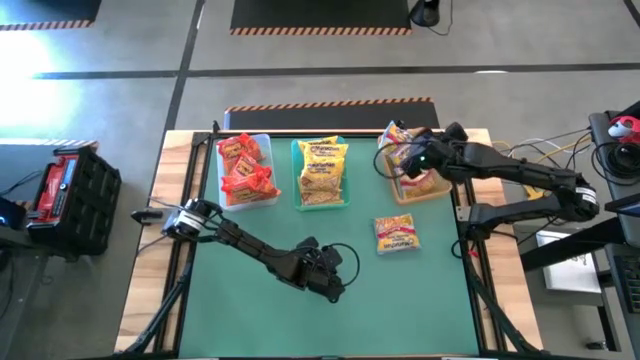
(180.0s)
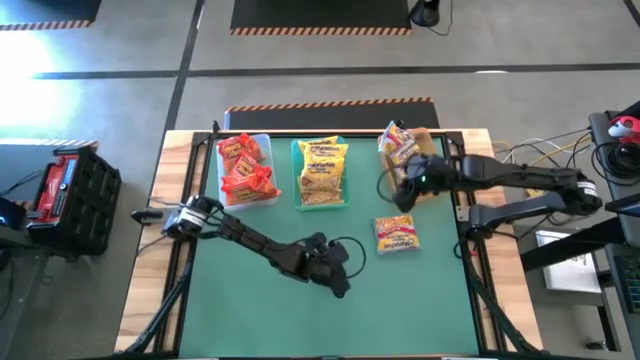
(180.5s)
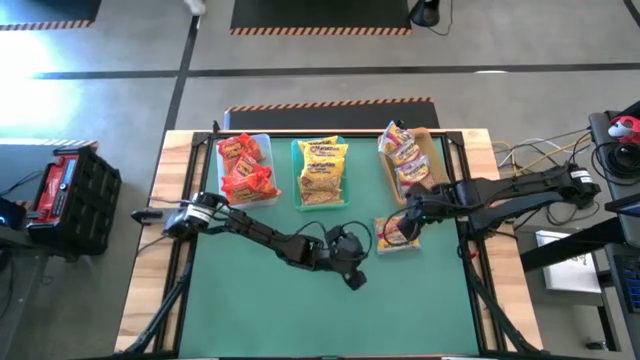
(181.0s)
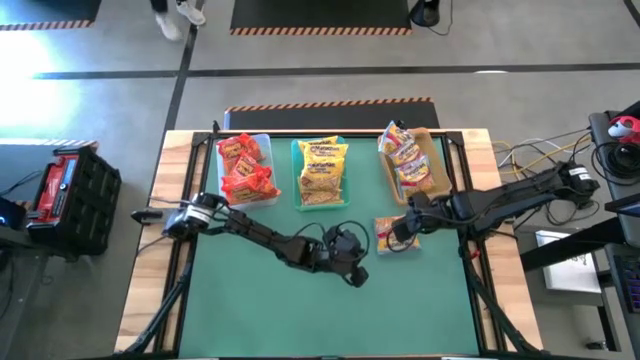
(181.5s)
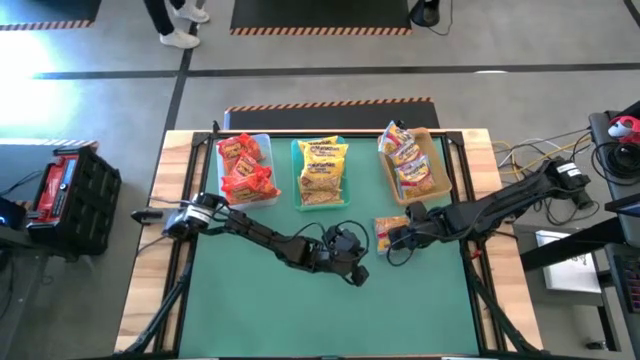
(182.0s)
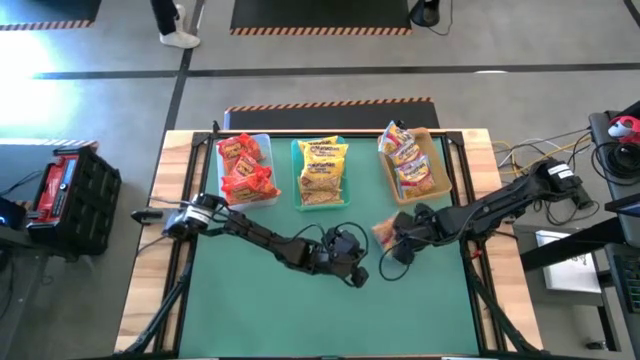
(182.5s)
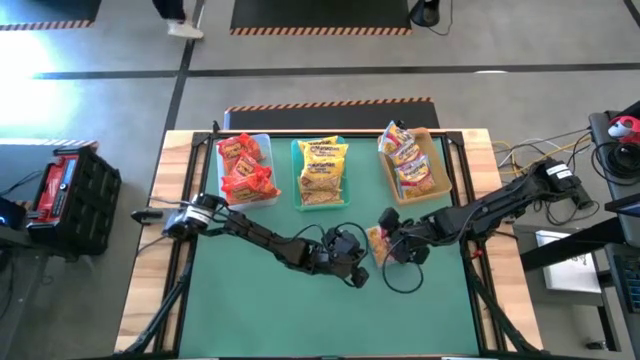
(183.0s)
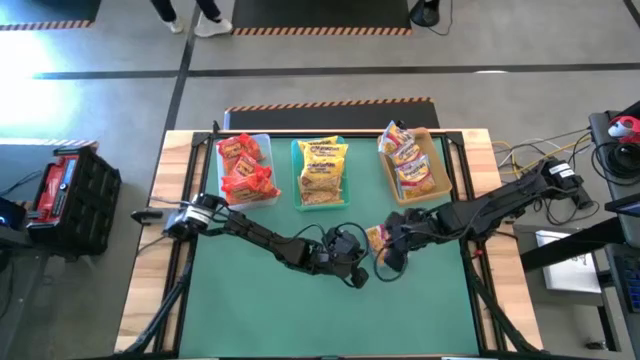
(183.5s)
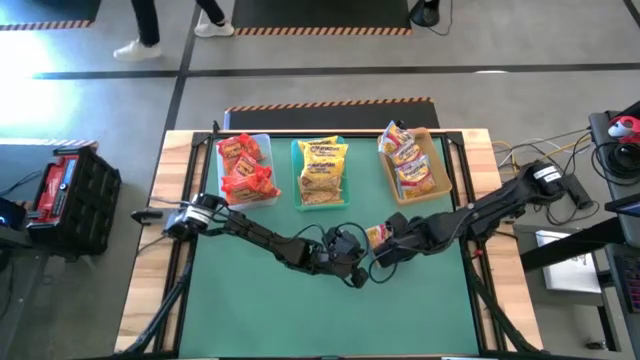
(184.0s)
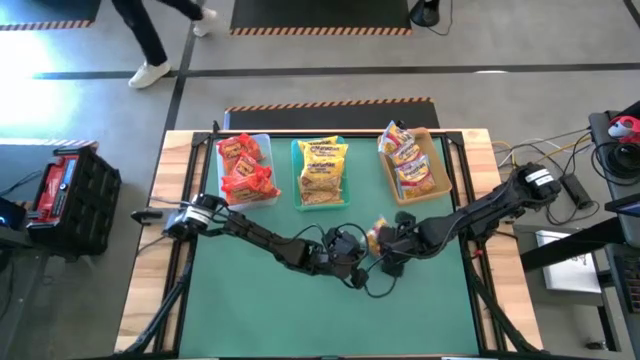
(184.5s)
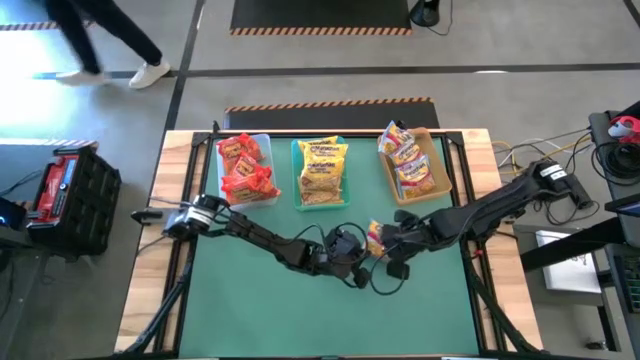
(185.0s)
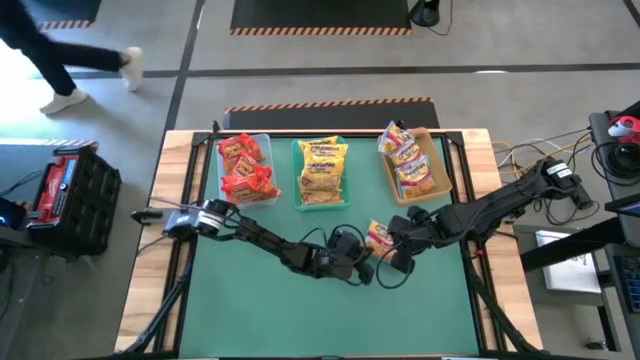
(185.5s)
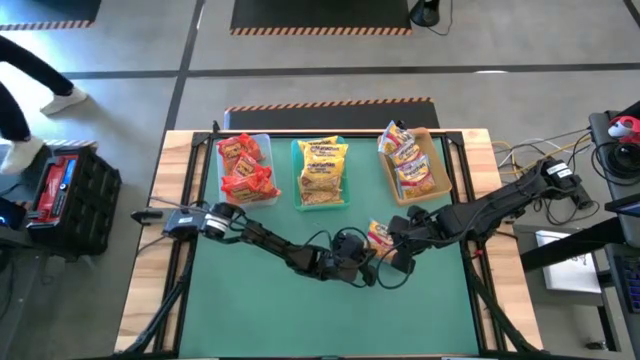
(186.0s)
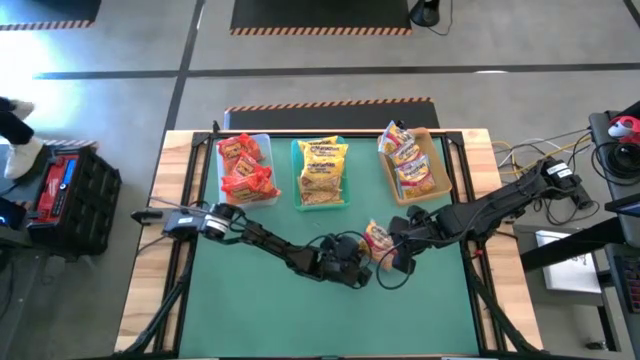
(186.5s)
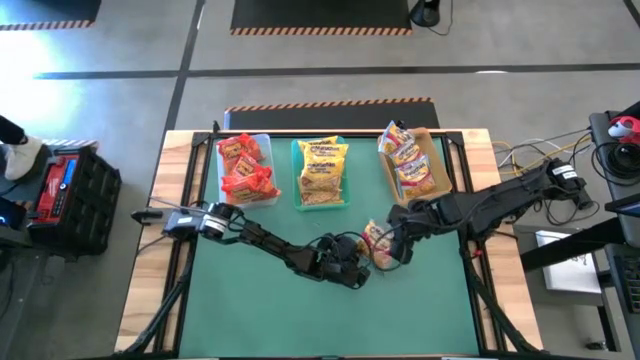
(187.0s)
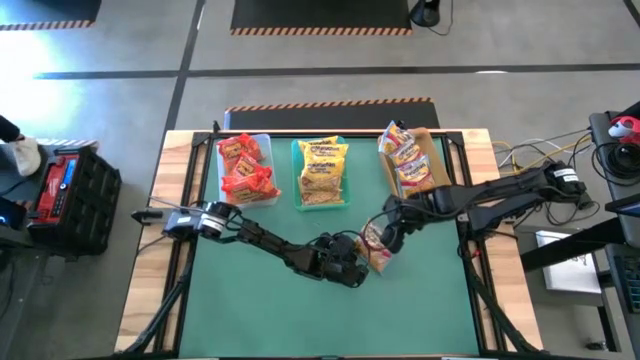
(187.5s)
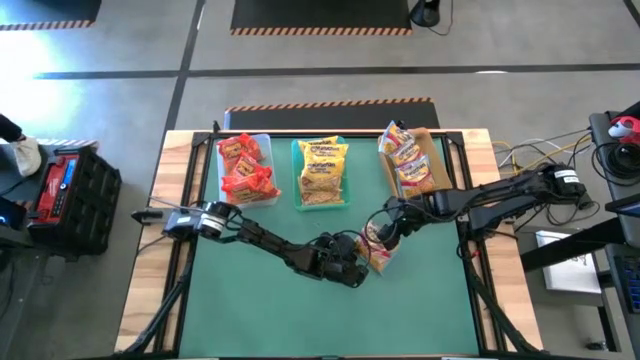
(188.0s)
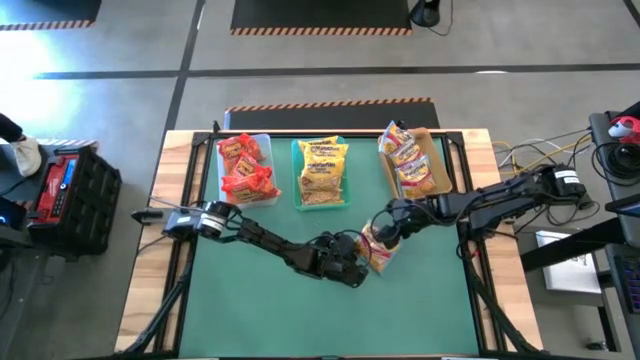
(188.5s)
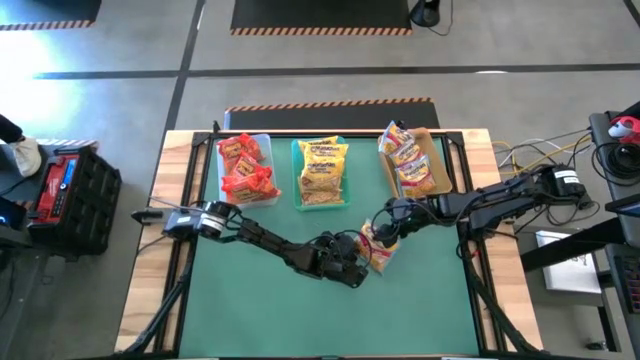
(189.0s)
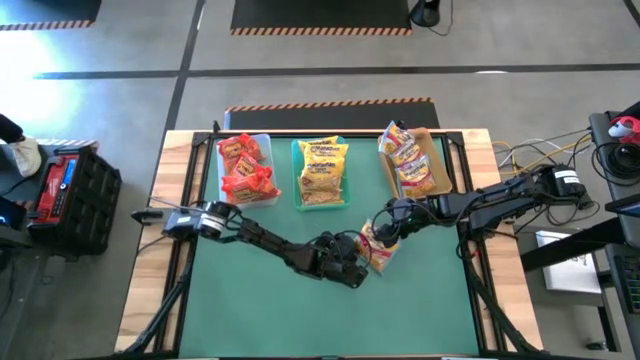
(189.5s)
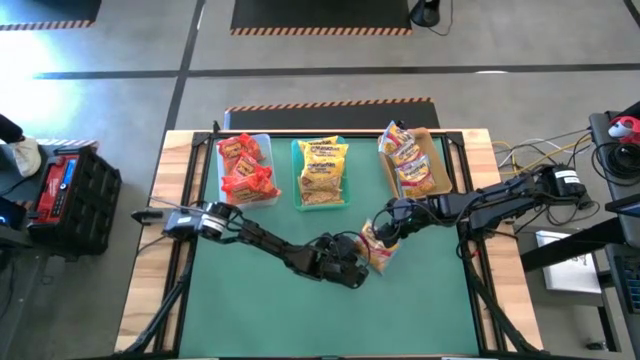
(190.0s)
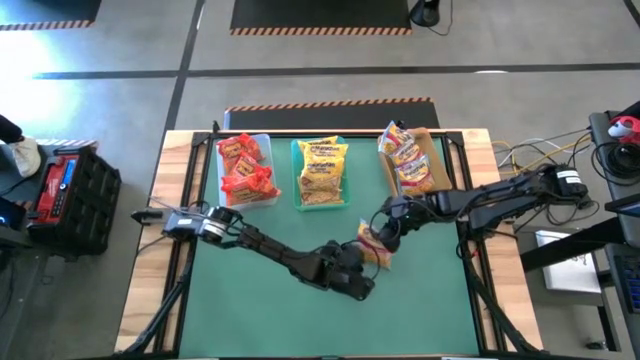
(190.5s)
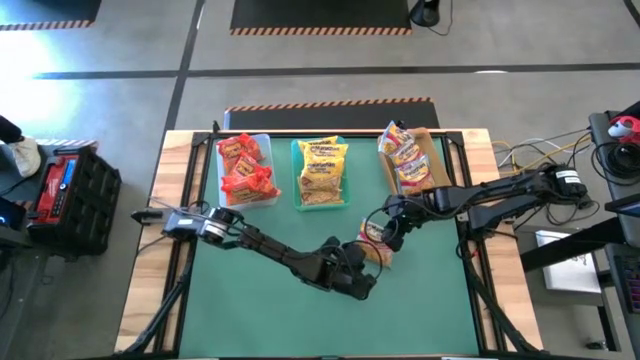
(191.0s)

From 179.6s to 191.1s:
Task: Sort Maruchan noodles
Put the blue noodle pack into the orange bin

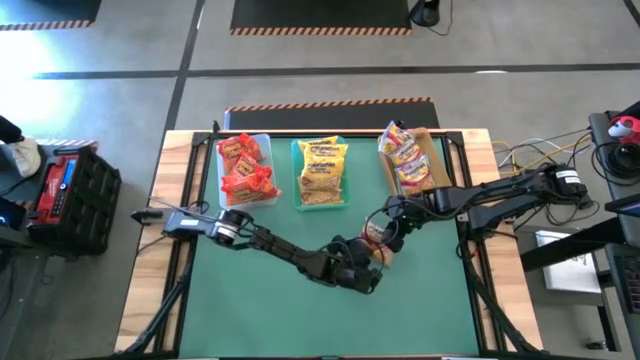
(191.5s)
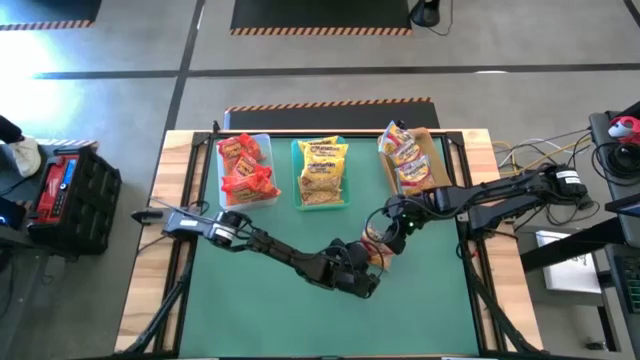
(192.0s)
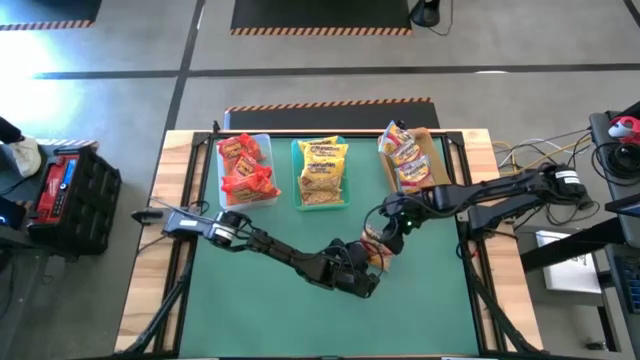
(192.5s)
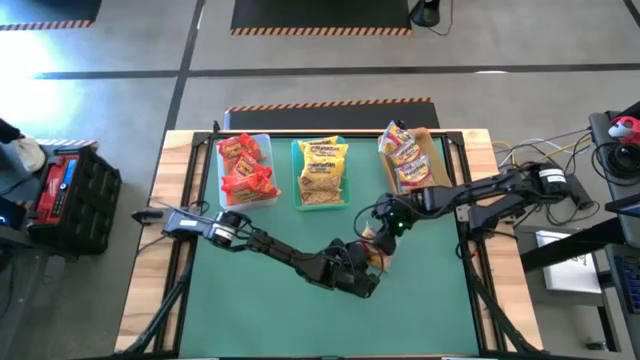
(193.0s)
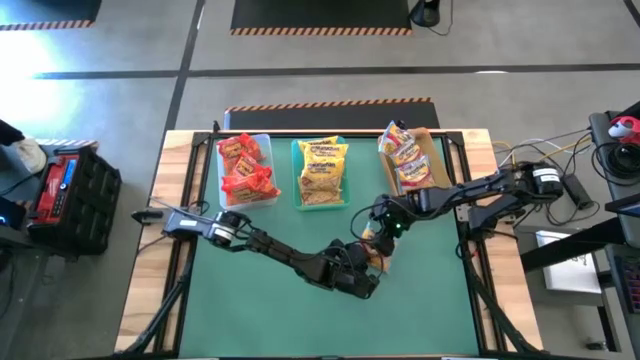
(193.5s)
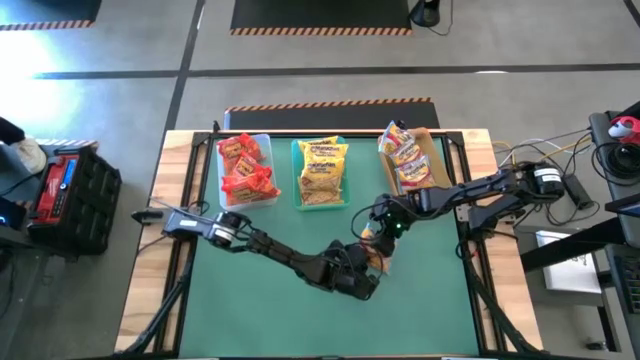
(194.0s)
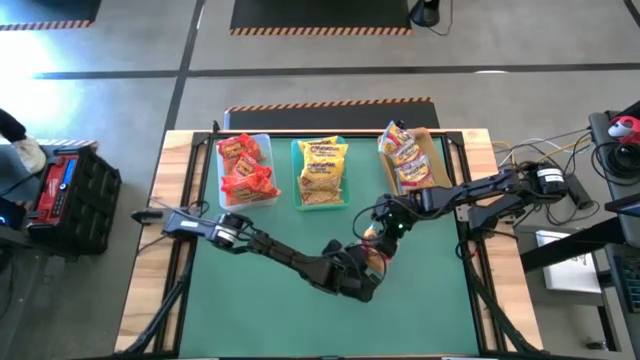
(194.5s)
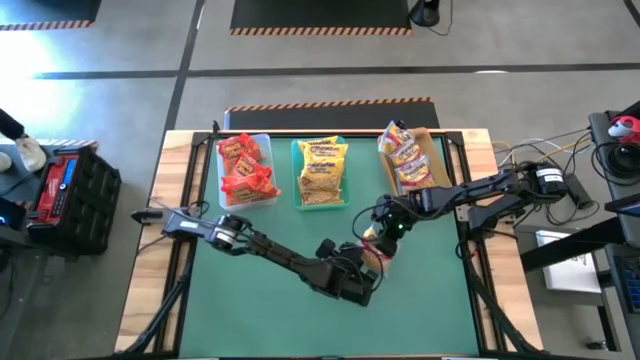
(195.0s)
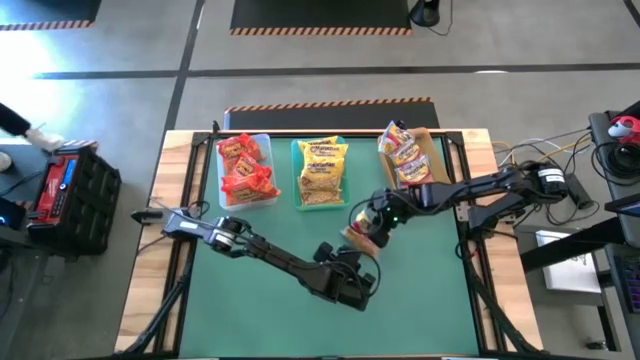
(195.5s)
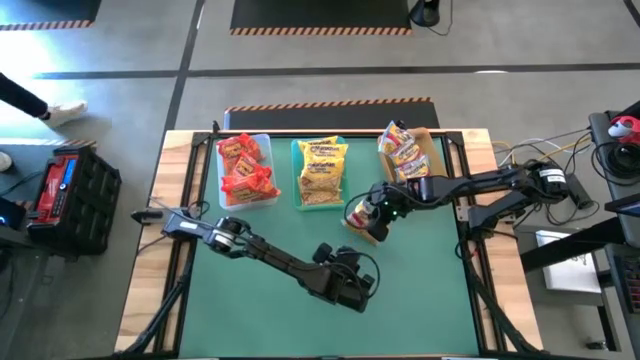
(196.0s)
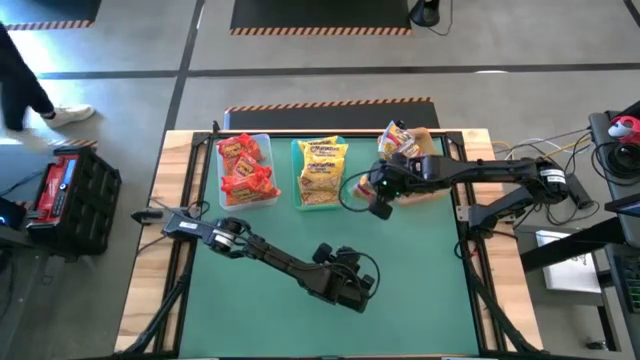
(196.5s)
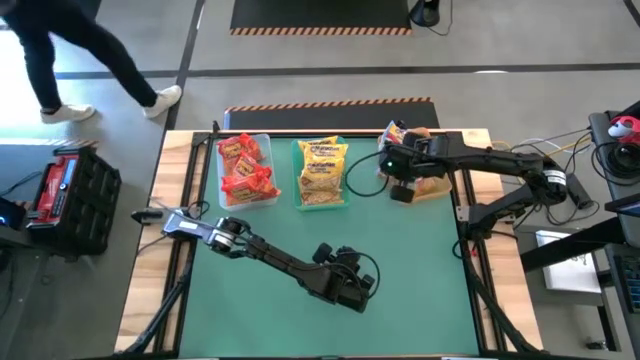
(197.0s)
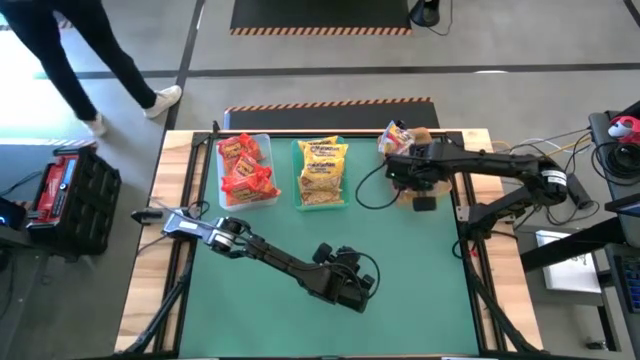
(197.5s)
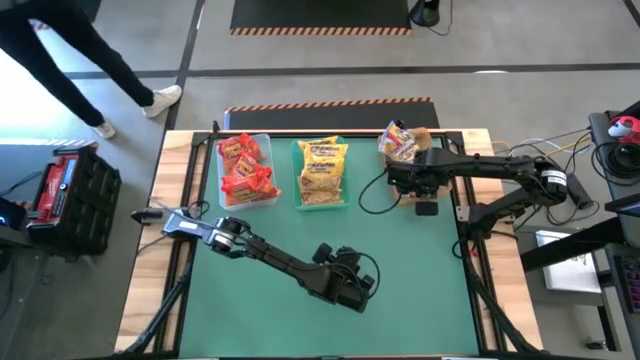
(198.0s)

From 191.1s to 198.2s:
Put the blue noodle pack into the orange bin

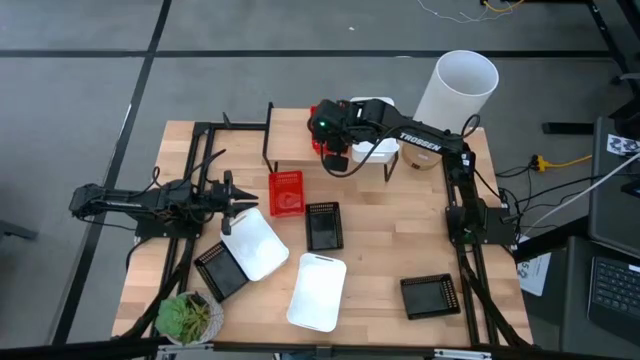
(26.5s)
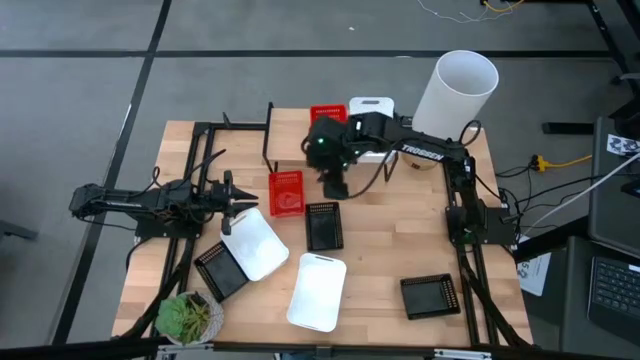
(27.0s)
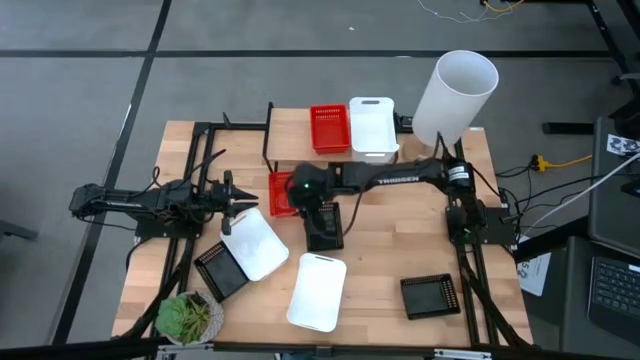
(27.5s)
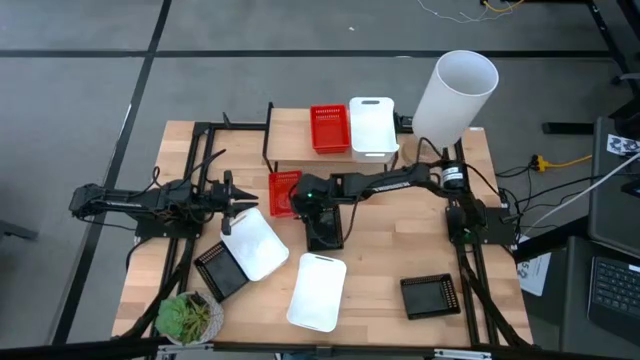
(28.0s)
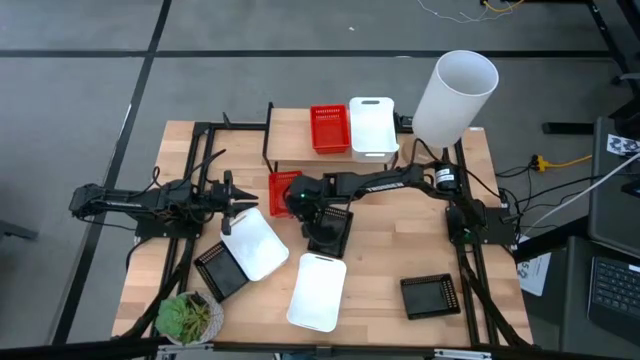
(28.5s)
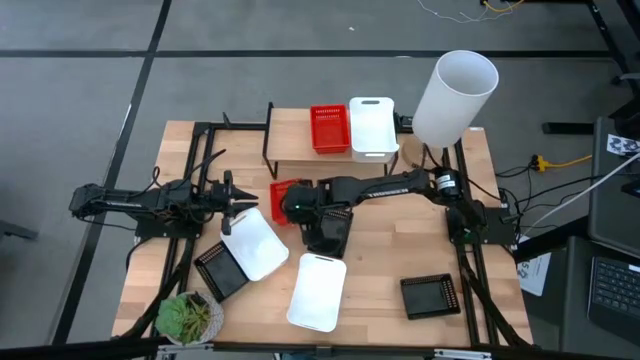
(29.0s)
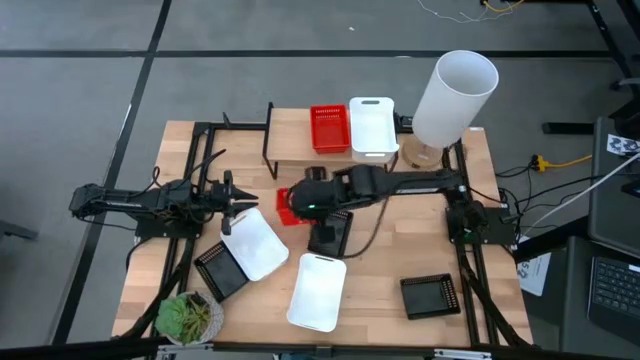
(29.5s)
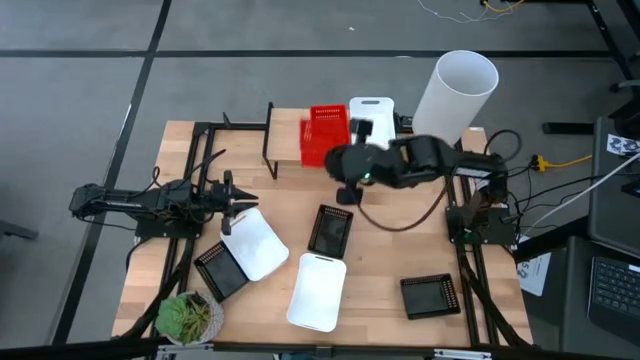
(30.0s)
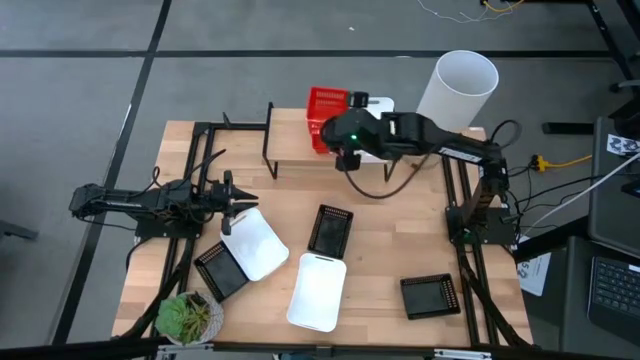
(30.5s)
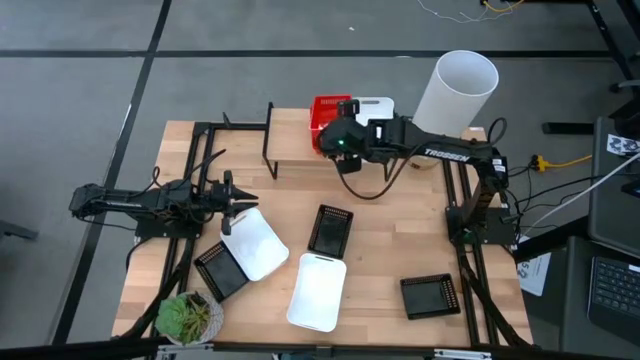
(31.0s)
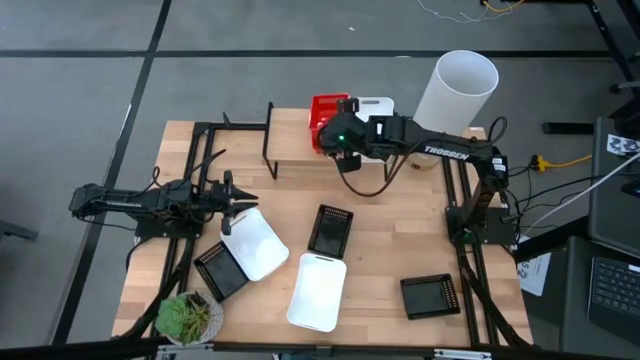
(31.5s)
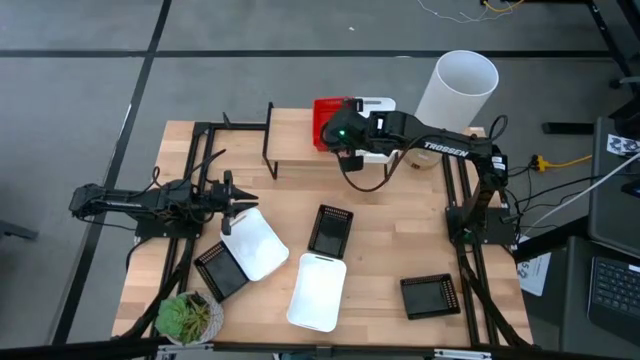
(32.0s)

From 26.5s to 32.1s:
Task: Stack baskets on shelf by color
Stack the red bin on top of the other red bins on the shelf
